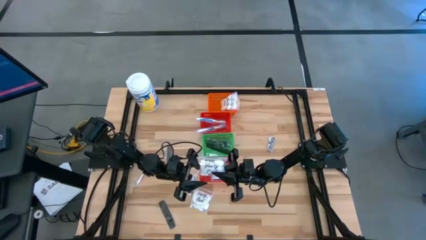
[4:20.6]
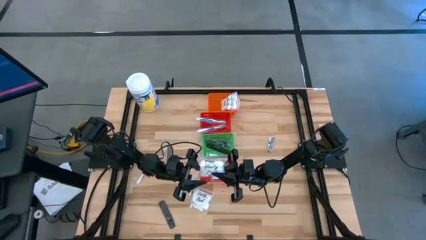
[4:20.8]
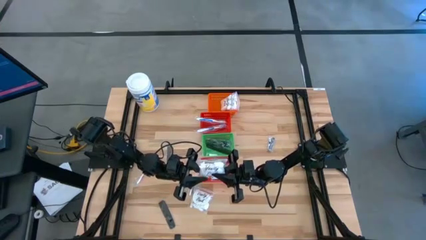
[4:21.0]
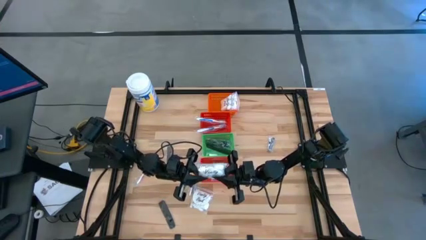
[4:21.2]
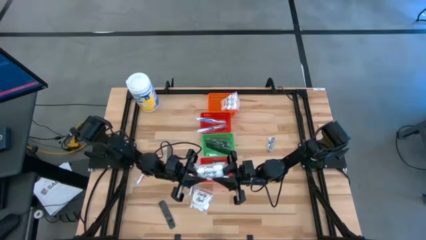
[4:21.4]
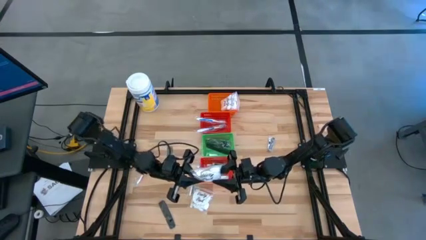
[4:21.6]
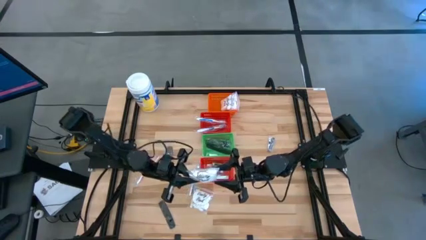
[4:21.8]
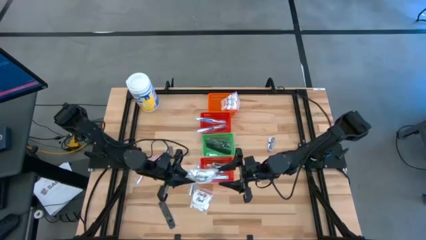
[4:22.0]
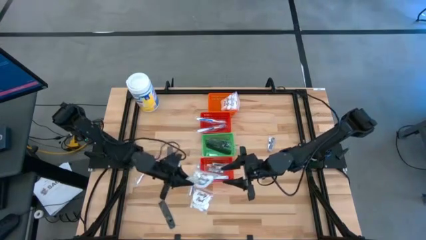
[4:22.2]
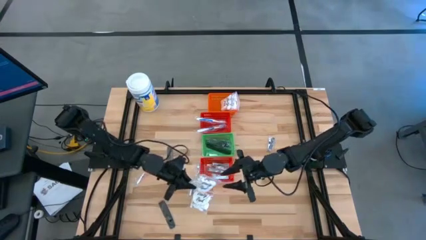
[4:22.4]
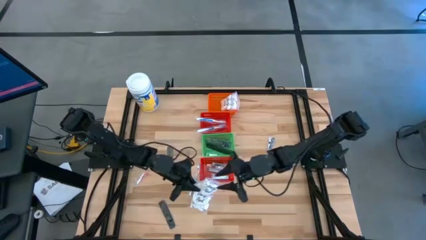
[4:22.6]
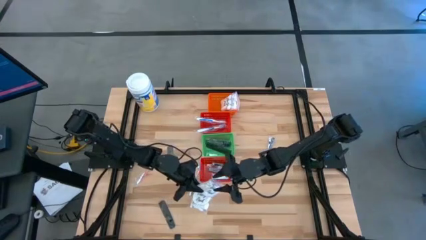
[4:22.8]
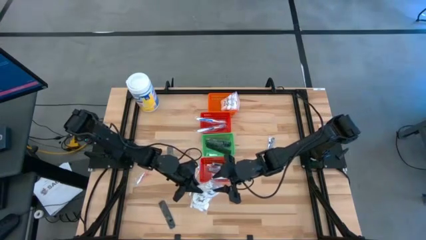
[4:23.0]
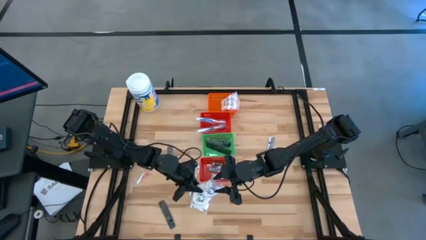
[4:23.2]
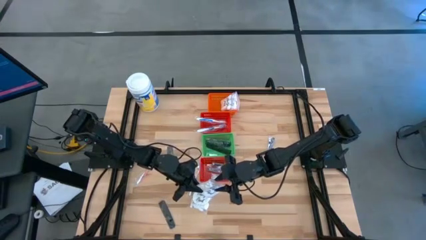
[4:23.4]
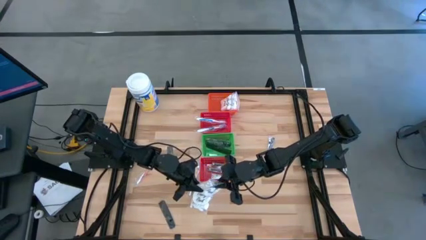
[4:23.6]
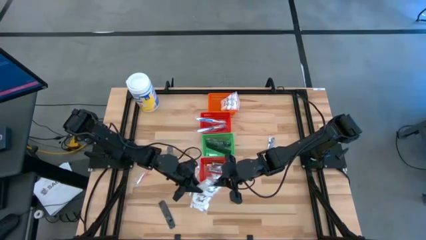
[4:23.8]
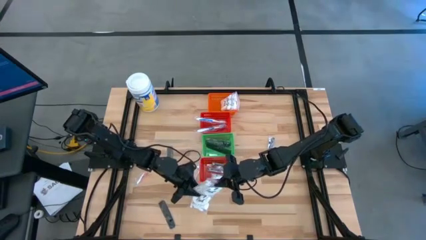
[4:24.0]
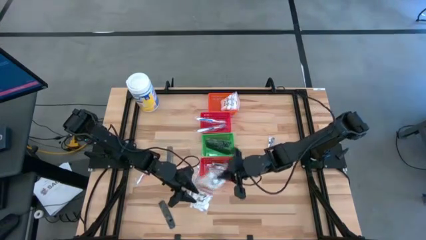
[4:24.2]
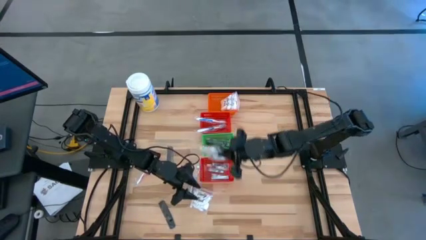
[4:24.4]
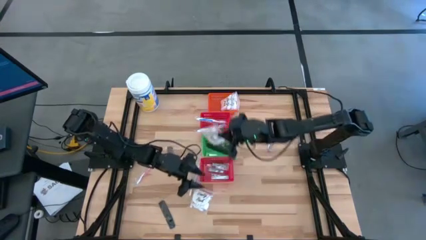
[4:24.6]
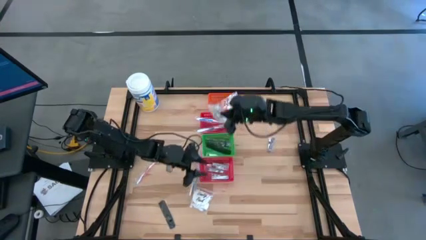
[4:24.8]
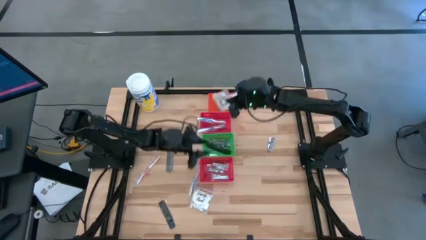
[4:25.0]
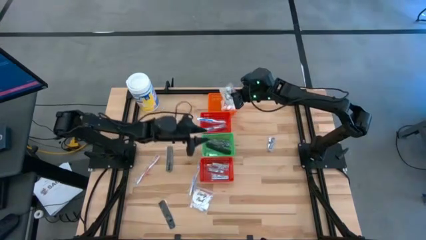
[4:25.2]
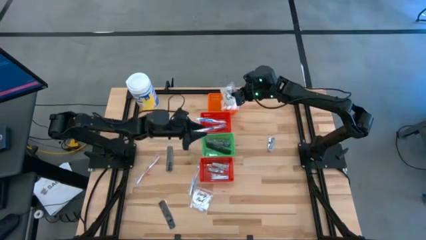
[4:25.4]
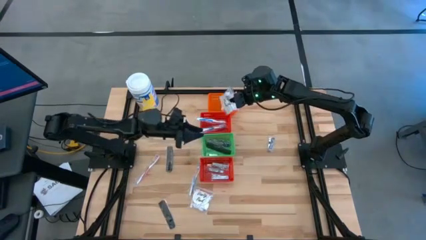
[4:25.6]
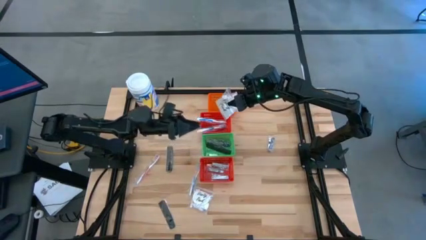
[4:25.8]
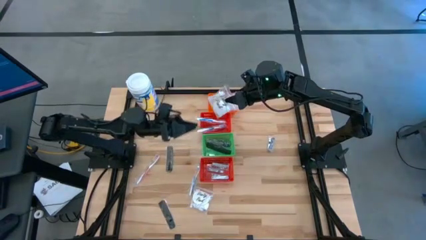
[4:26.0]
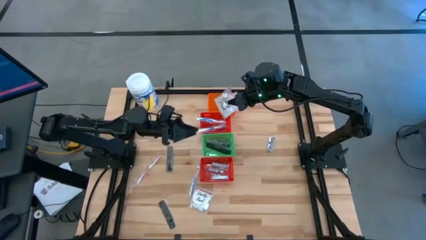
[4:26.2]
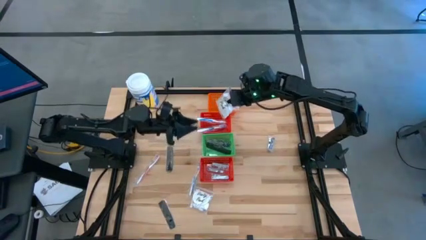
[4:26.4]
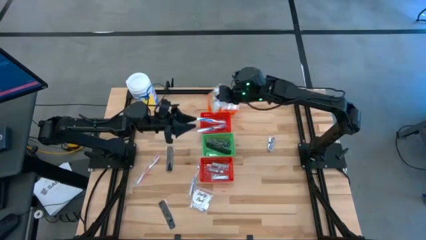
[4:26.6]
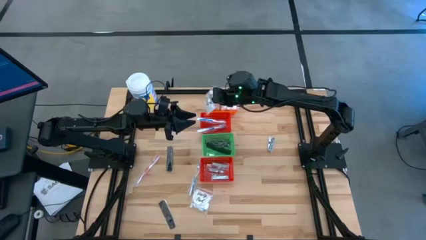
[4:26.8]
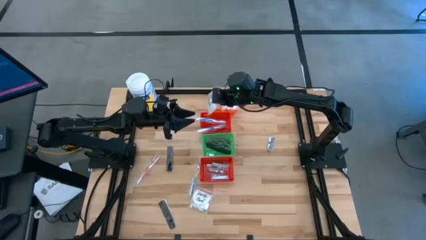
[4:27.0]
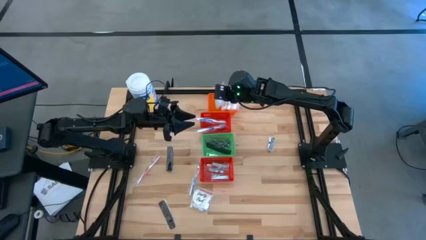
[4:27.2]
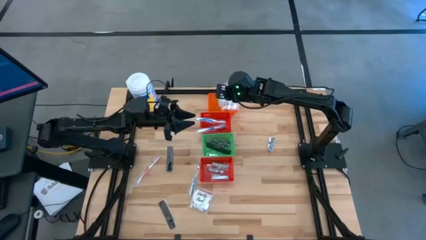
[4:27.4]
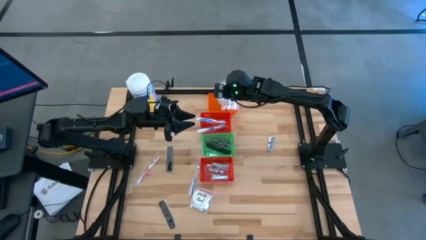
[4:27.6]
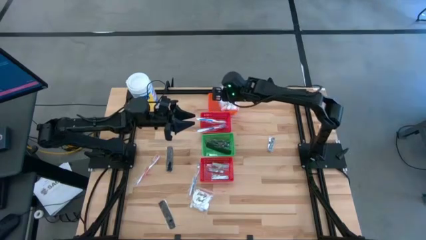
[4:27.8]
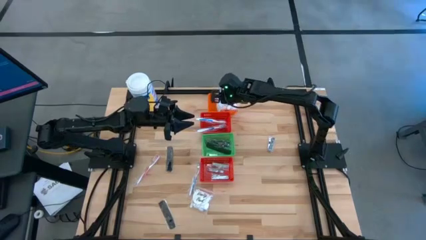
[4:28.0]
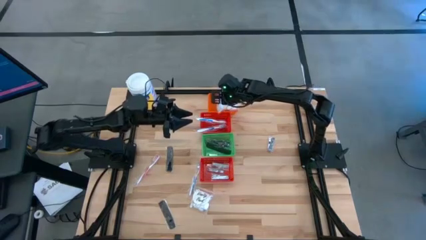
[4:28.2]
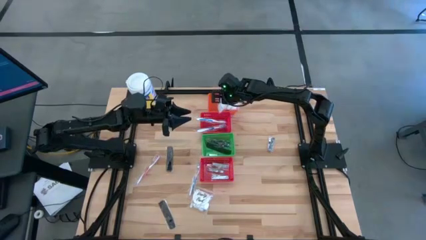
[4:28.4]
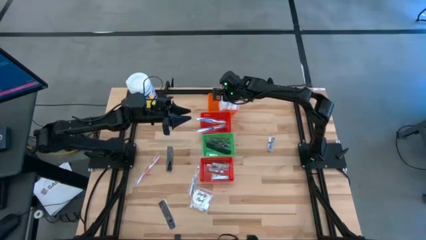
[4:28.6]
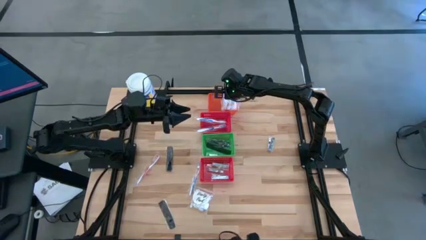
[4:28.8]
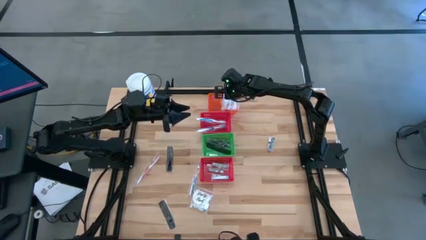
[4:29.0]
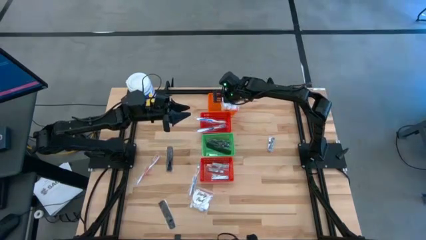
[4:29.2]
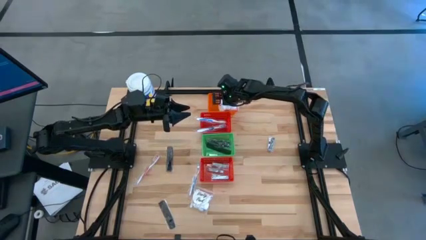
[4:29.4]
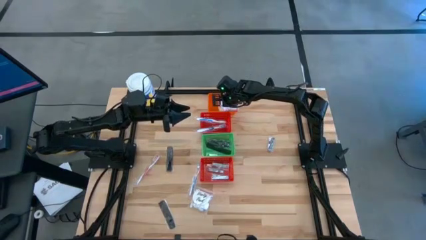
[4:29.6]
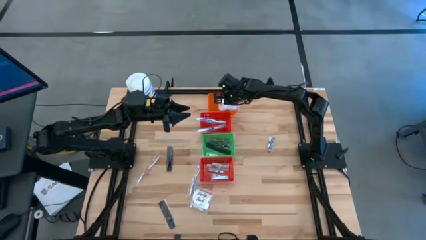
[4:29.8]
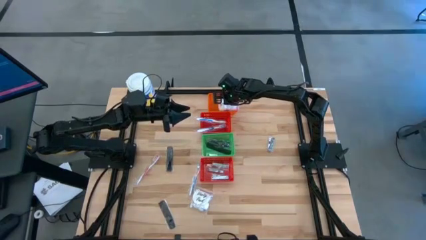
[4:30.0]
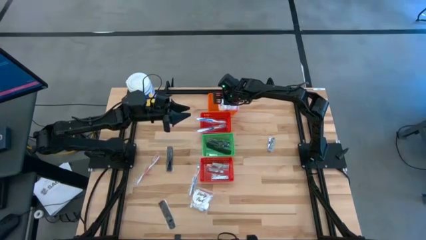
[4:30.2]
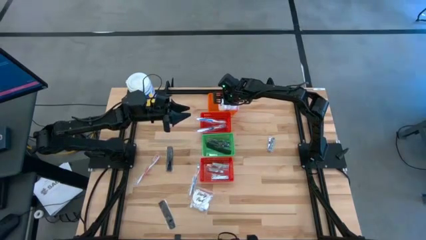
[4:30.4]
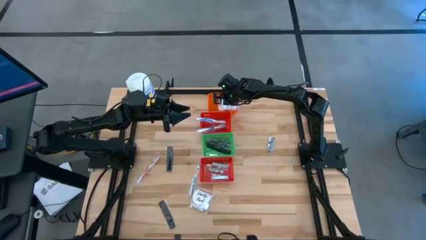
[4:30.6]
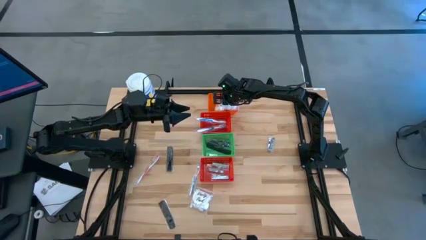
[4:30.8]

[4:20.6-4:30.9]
Task: Pick & Place Travel size toiletries
Put the transparent cotton pack into the orange basket

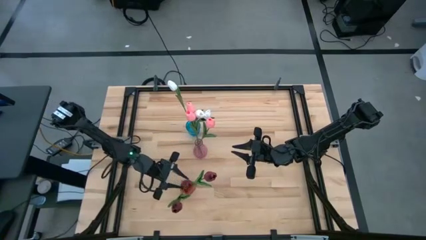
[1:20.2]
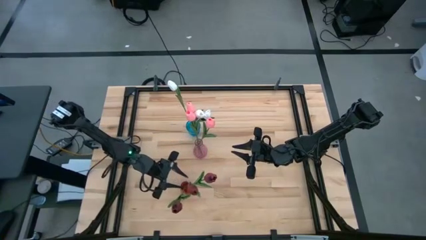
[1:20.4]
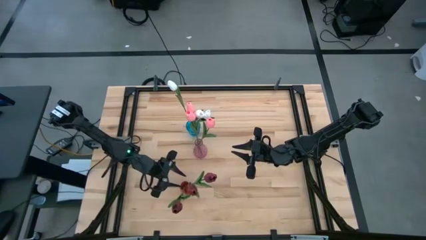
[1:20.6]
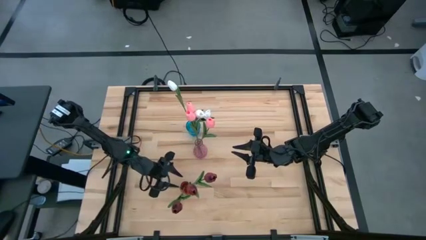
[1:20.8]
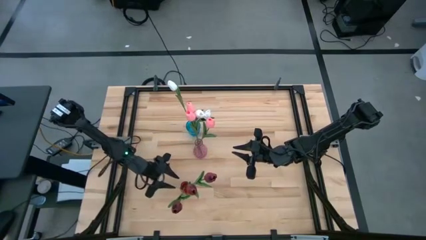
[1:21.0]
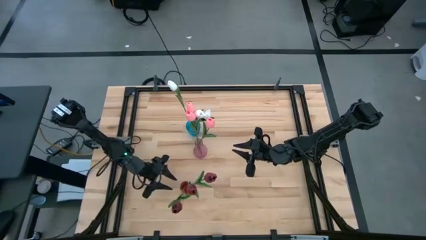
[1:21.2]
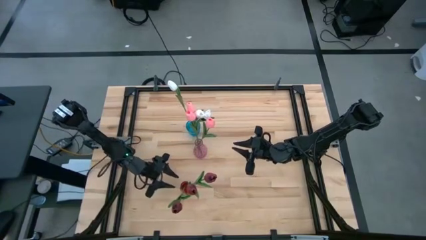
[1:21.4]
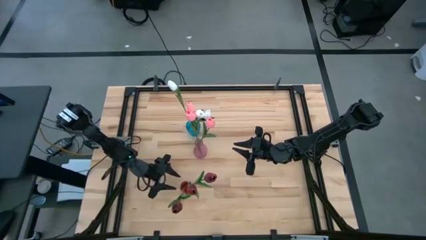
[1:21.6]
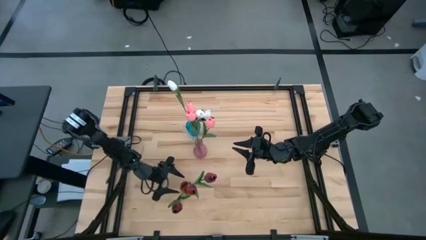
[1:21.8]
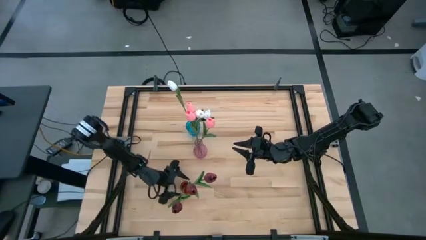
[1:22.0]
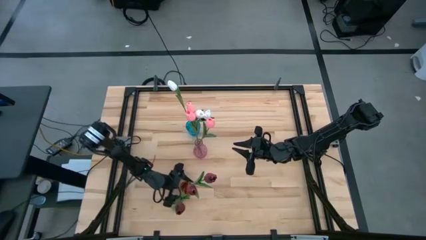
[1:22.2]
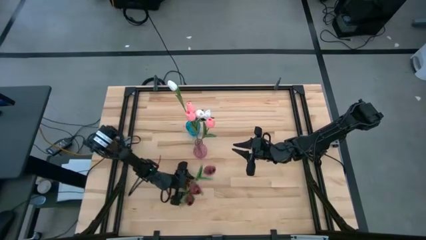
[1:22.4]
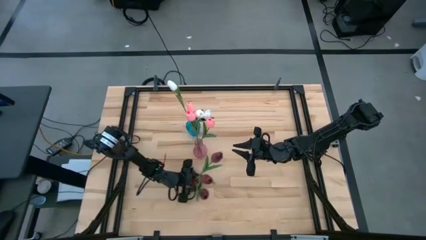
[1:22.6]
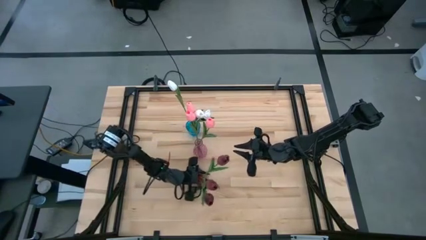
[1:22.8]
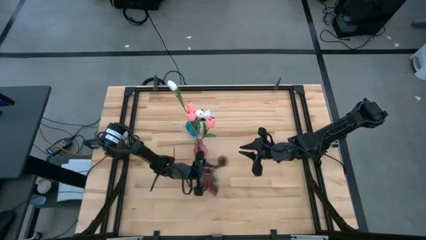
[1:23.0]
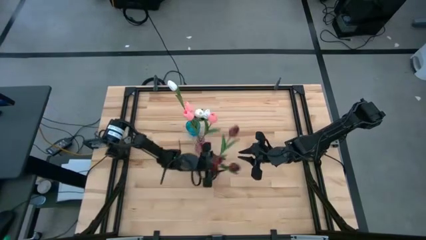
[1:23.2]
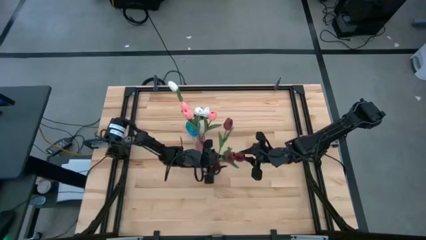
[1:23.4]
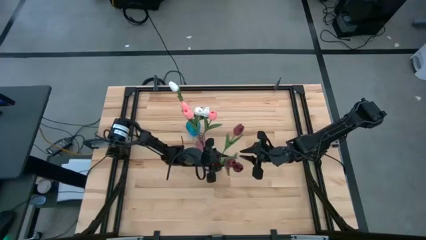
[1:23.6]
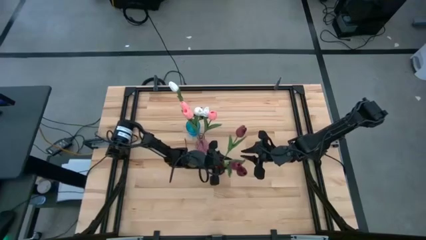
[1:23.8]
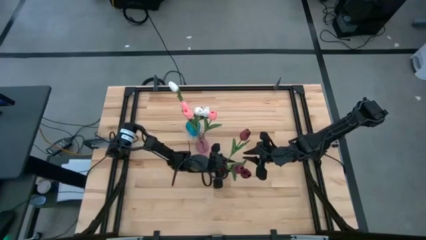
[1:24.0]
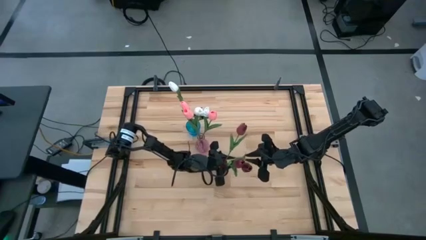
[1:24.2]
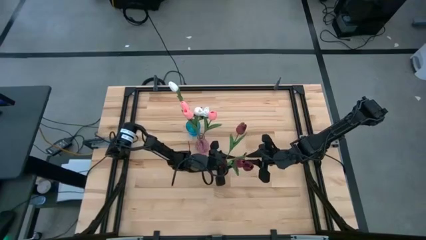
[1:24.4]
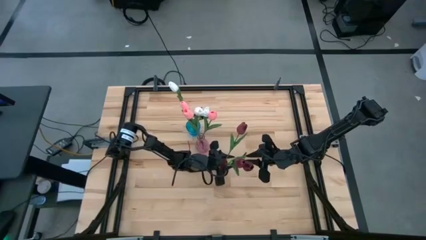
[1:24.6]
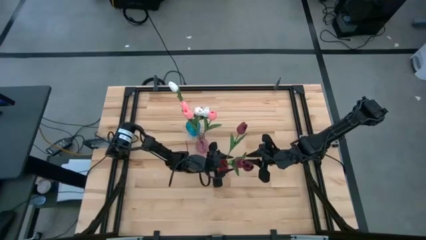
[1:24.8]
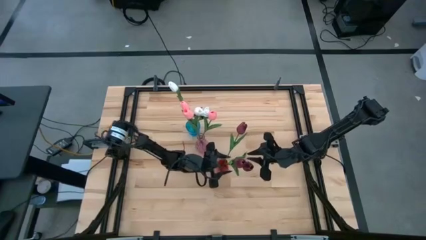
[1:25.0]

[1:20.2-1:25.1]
Task: Sort flowers into vase by color
Move the red vase to the center of the table
